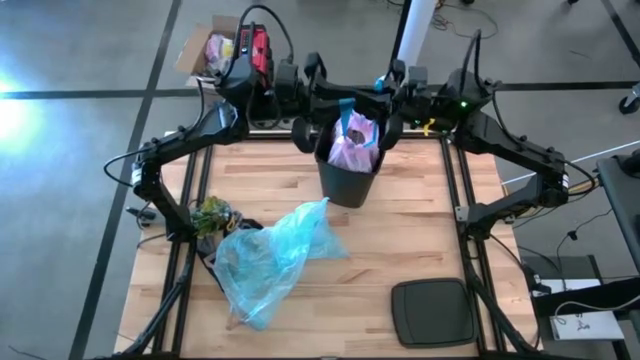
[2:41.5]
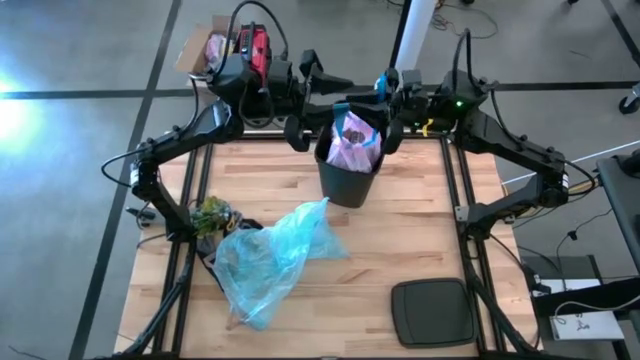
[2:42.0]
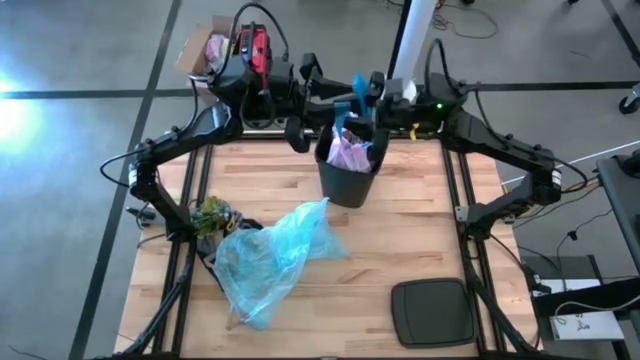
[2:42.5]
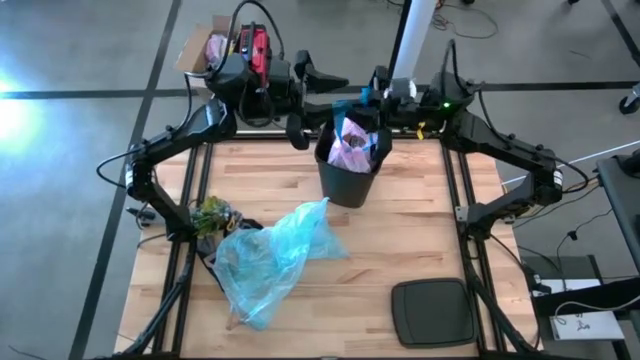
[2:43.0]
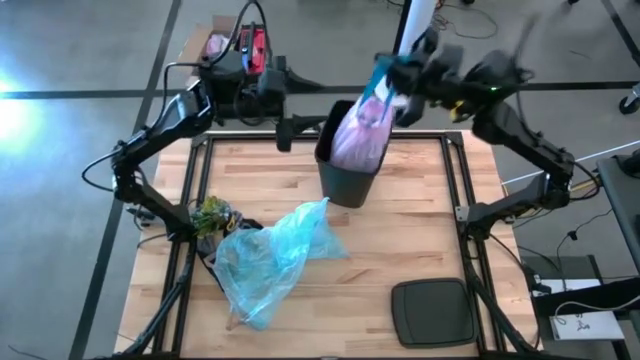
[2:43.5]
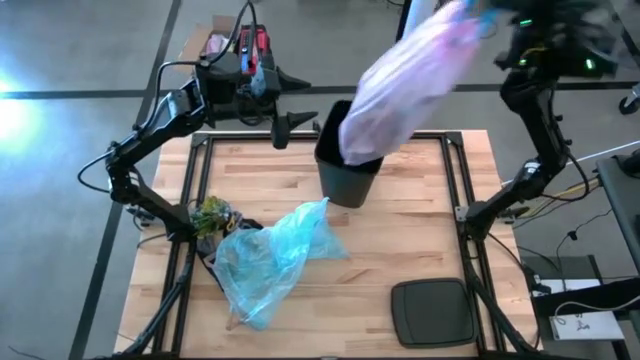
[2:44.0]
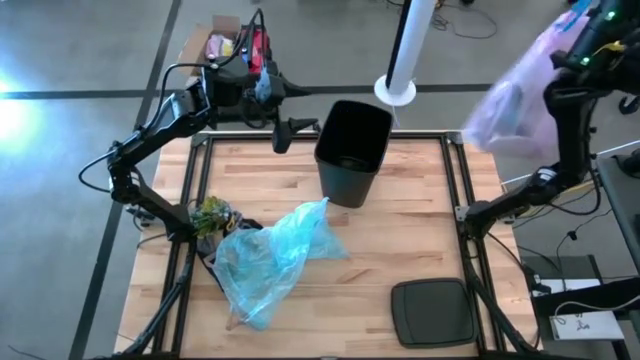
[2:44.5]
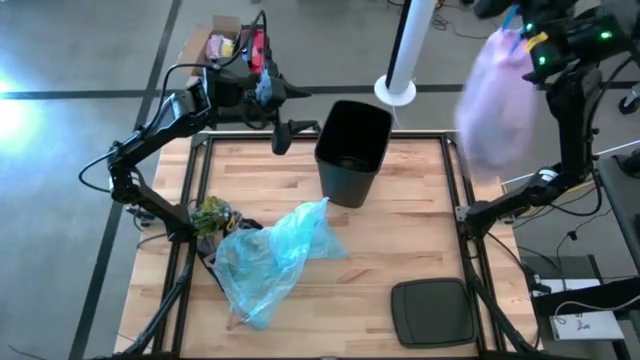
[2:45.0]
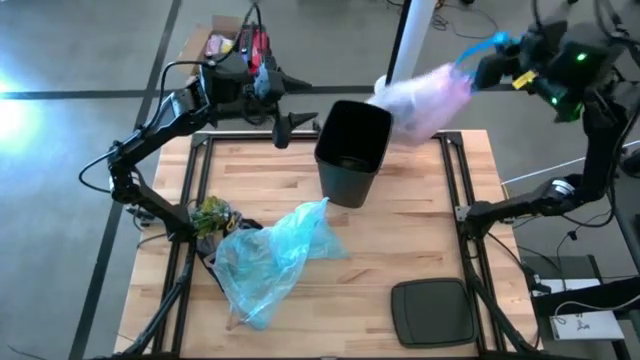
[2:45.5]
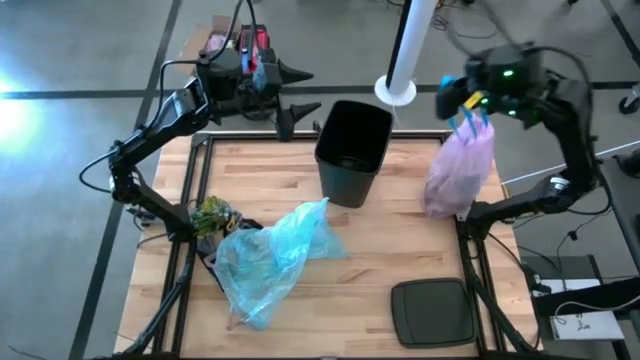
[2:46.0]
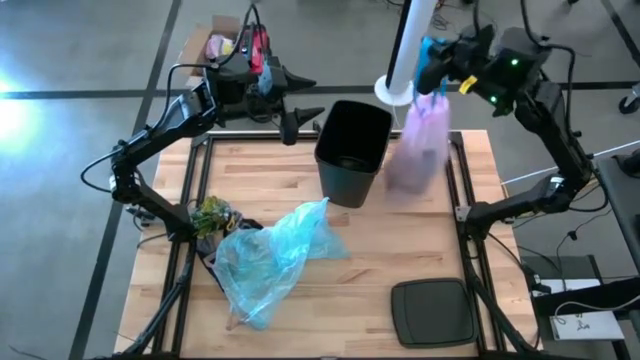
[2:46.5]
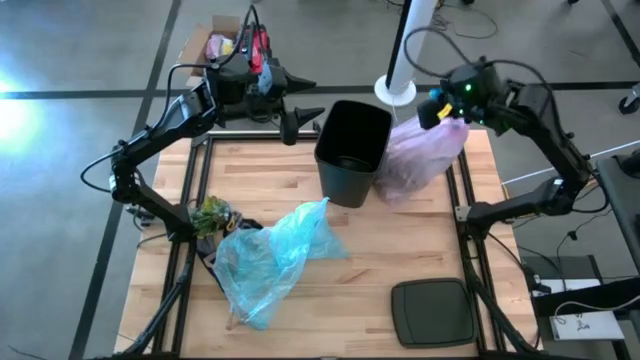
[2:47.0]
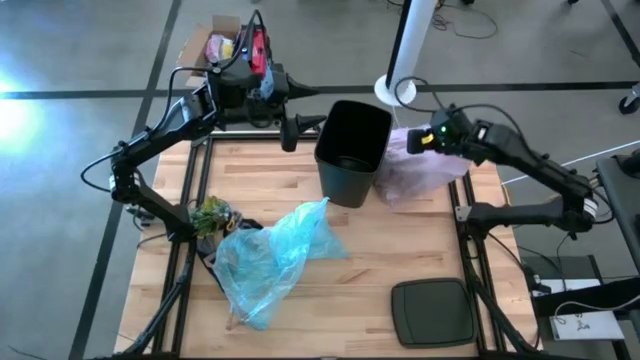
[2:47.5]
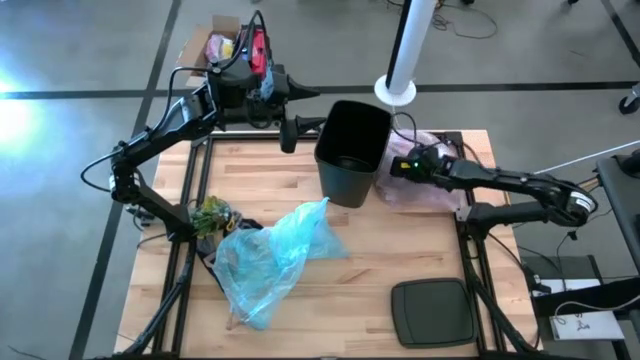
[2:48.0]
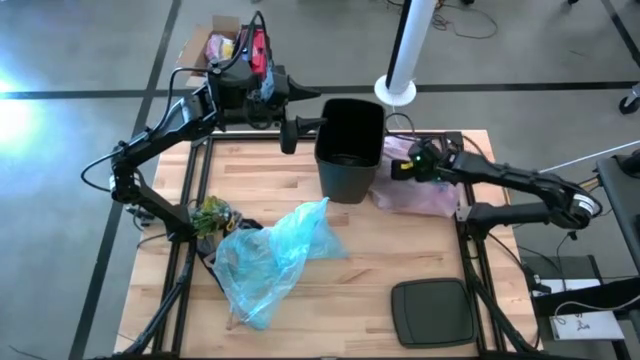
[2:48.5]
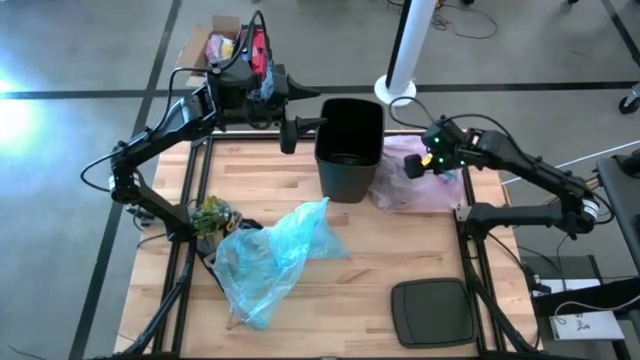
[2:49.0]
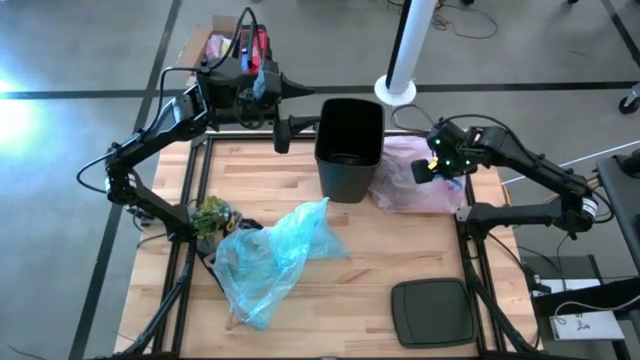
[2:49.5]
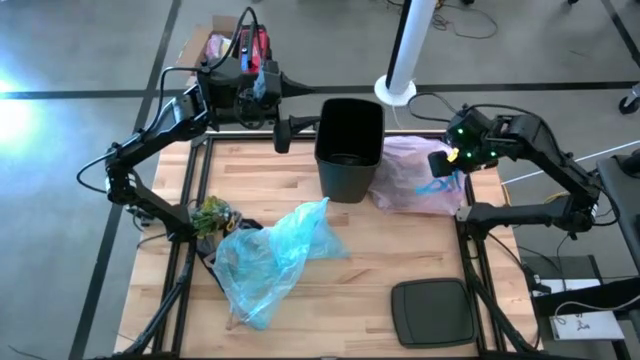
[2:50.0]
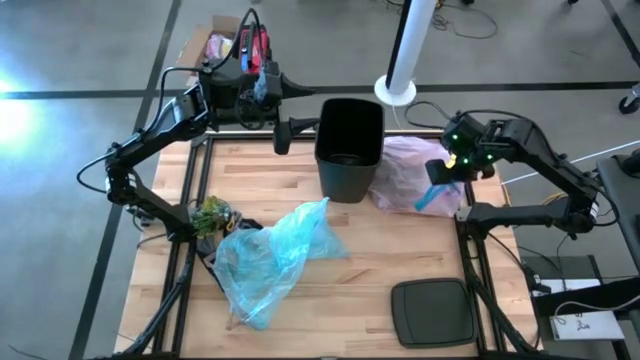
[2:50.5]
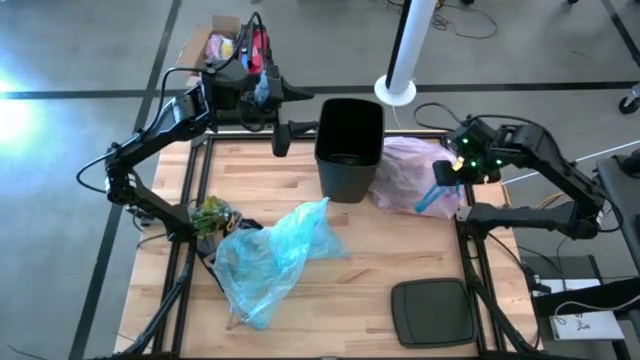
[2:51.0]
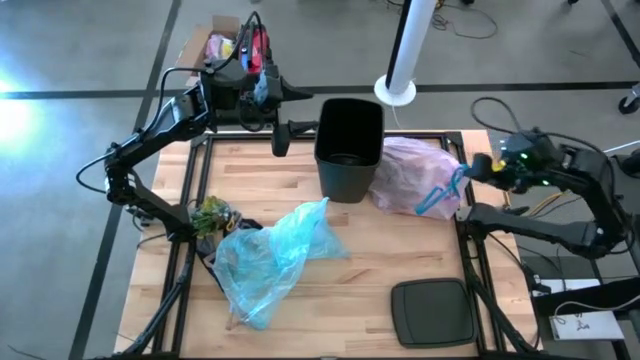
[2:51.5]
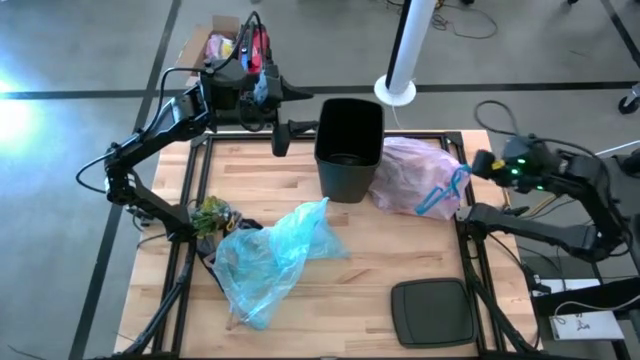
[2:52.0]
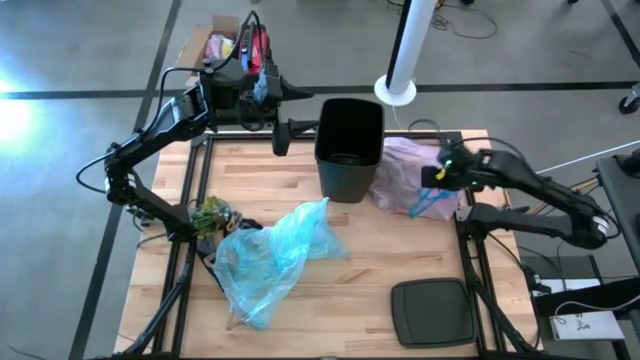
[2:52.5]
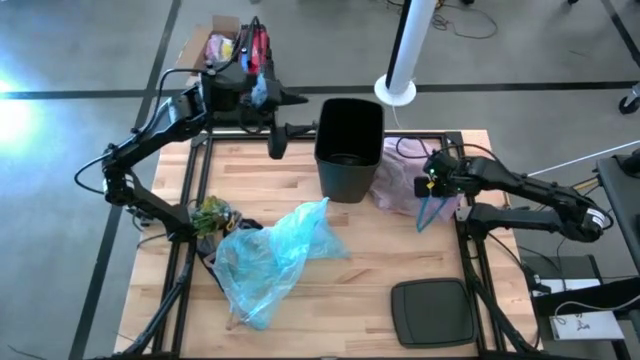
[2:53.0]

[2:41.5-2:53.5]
Task: place trash/remove bag and relplace
Remove the pink trash bag from the trash bin

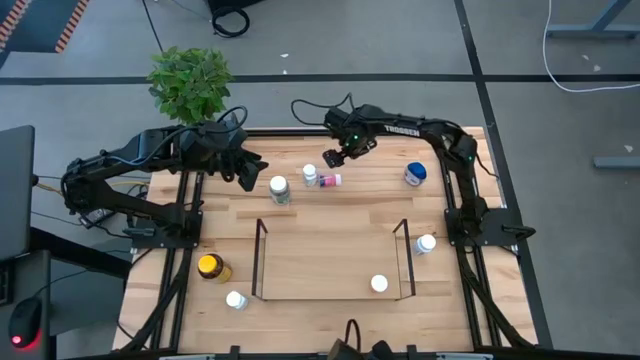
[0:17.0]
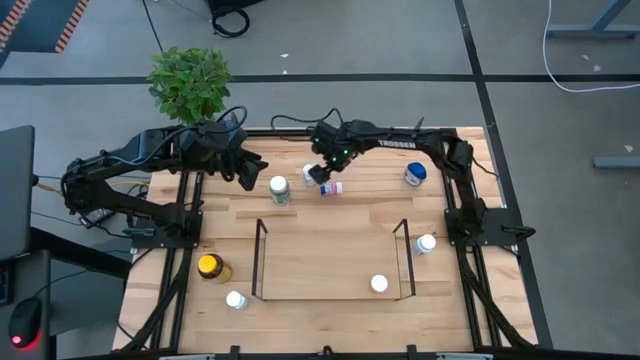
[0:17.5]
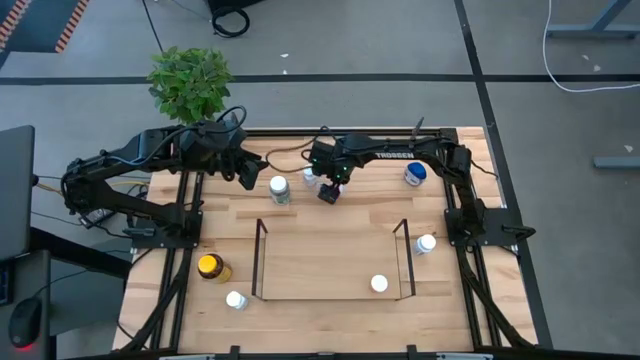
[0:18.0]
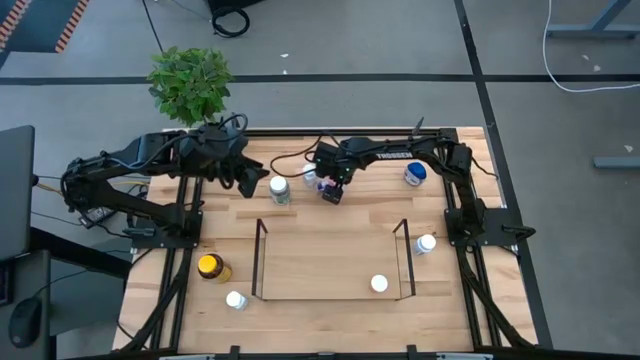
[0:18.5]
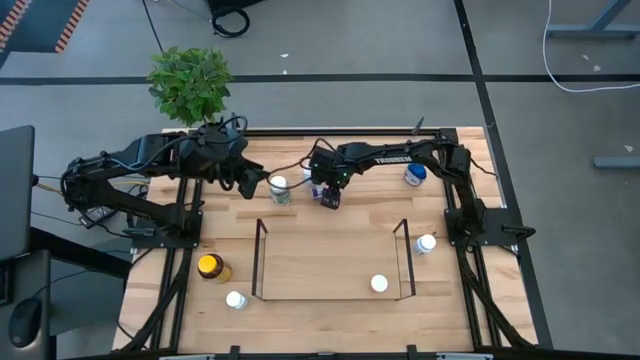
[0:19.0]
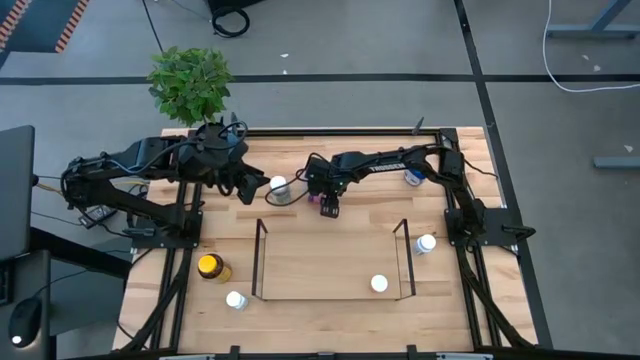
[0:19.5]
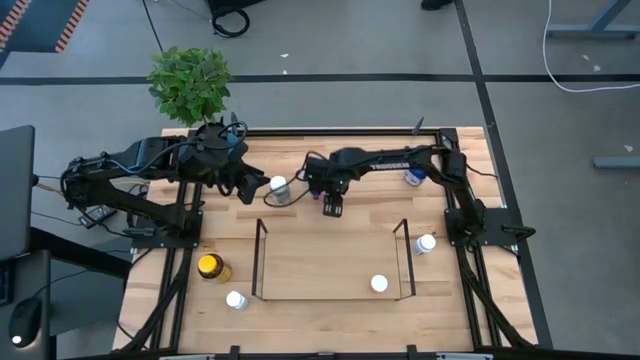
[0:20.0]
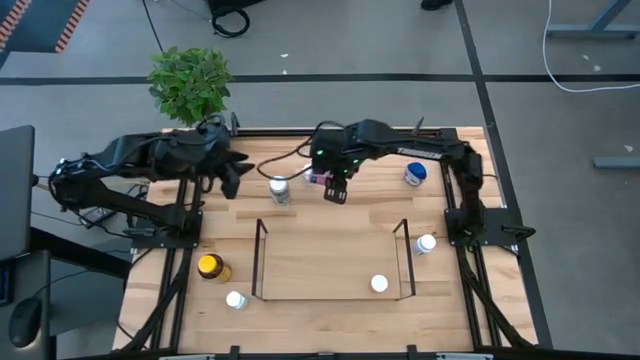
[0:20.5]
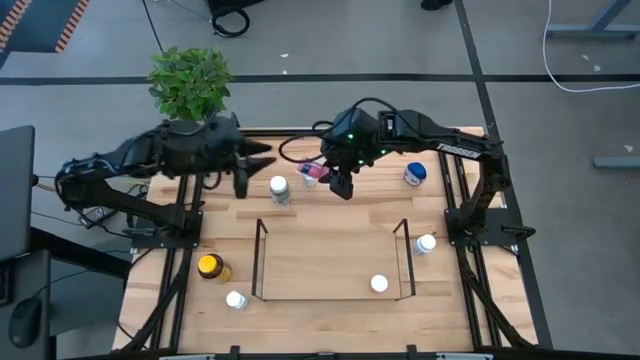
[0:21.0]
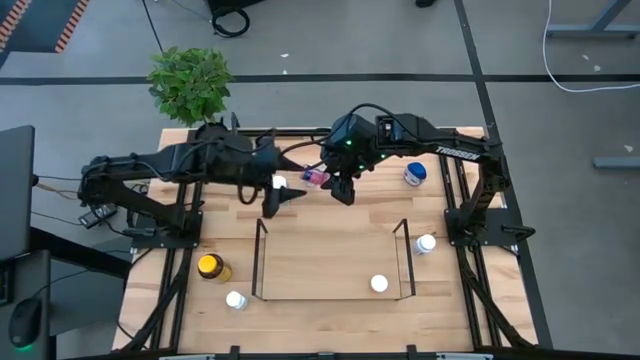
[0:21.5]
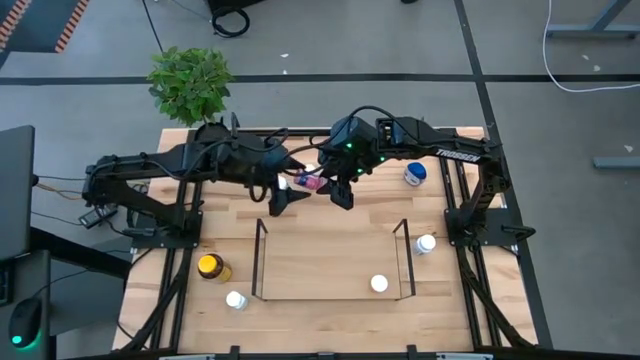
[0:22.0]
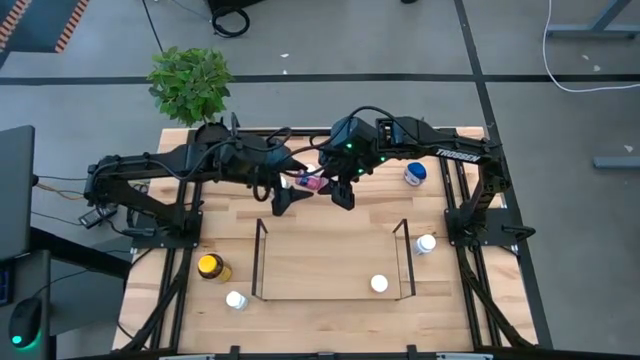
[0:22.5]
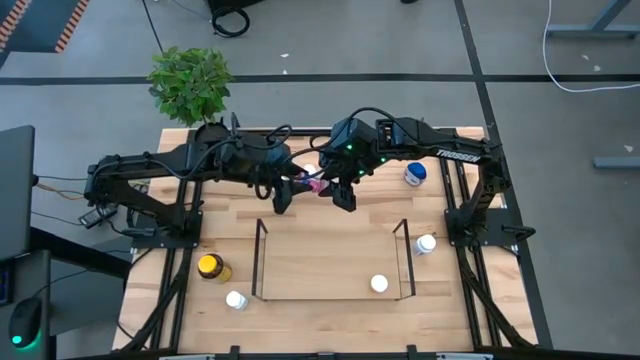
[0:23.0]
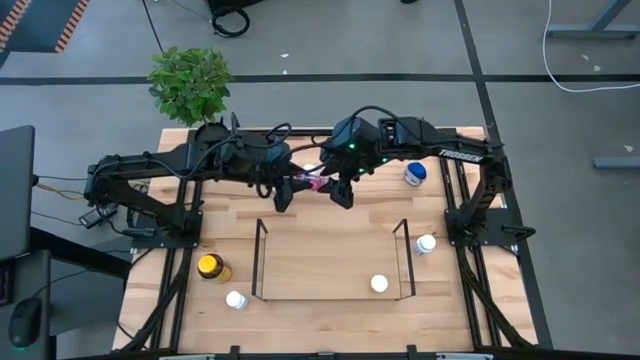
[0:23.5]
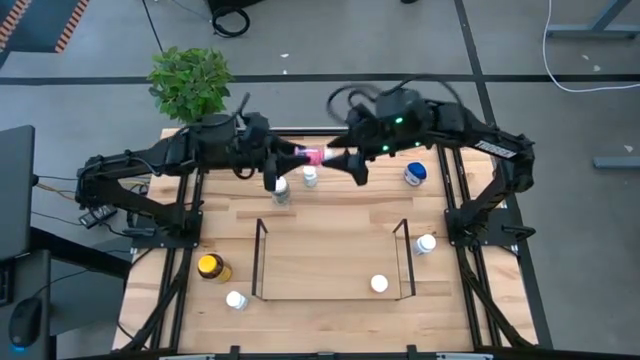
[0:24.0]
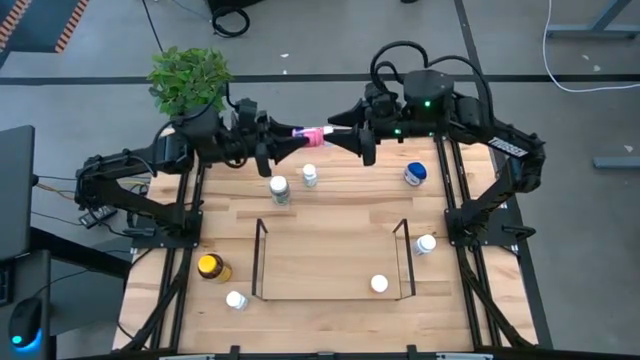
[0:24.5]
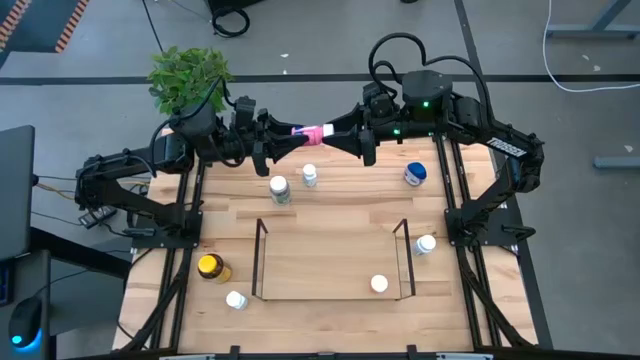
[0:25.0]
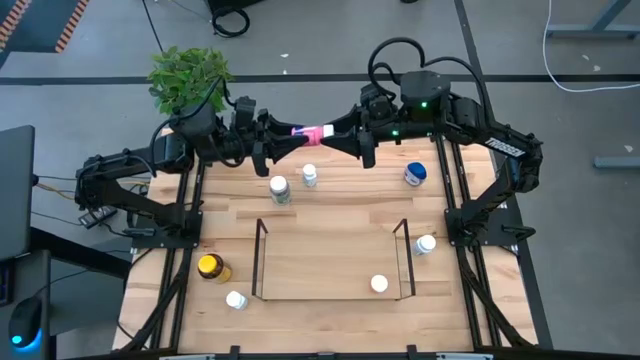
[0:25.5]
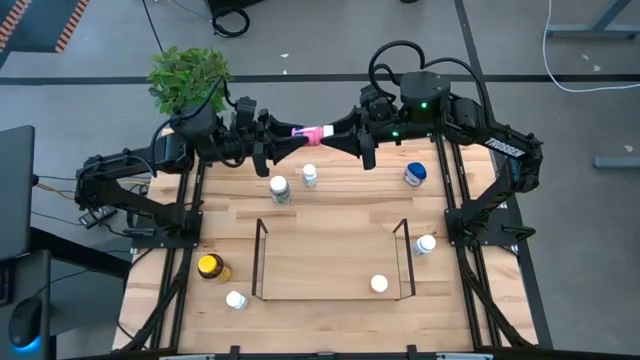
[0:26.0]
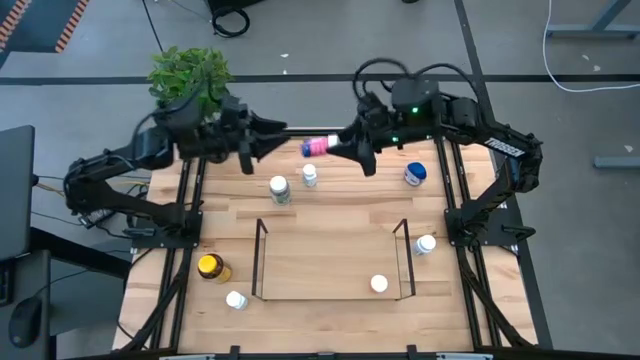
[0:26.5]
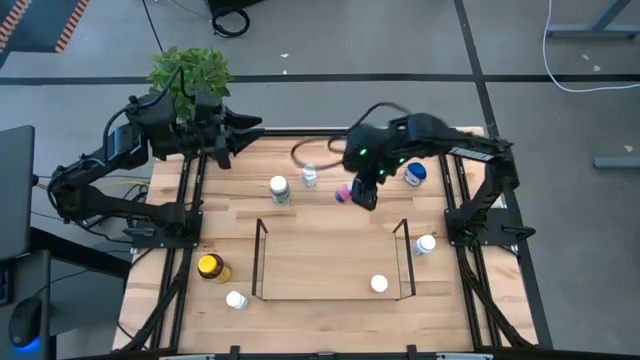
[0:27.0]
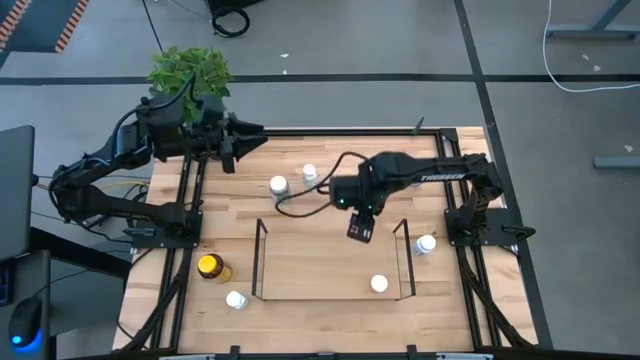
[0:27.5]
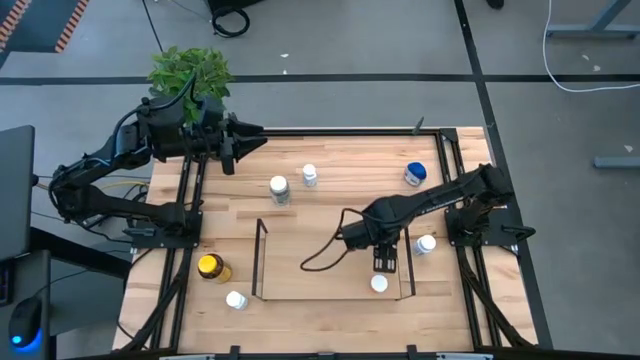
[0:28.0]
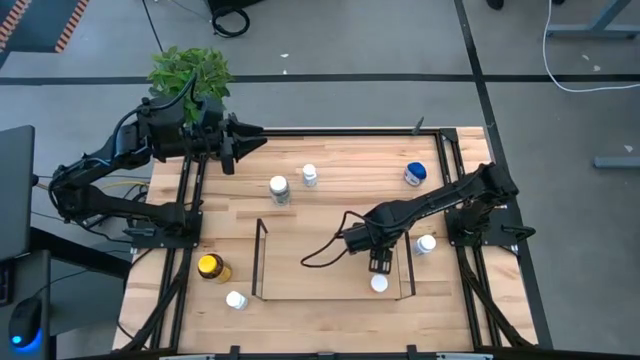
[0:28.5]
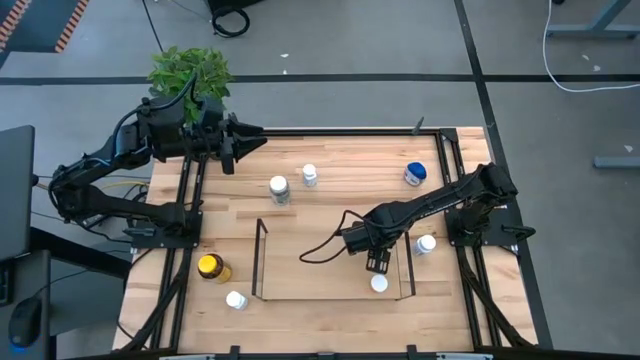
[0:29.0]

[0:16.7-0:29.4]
Task: Pick and place medicine bottles onto shelf by color
Put the pink pill bottle on the shelf
